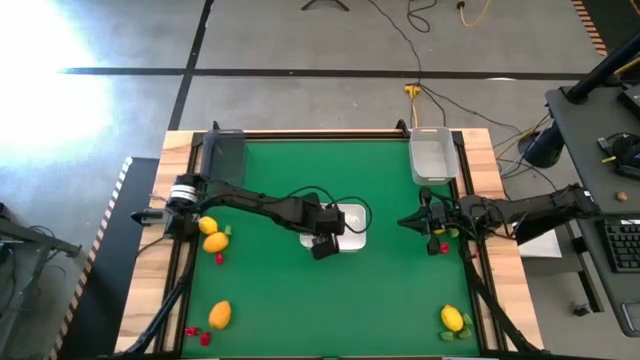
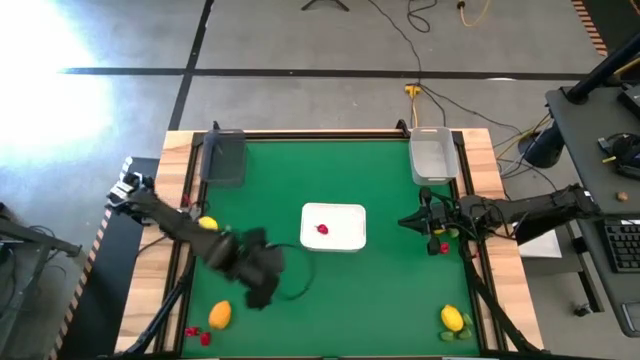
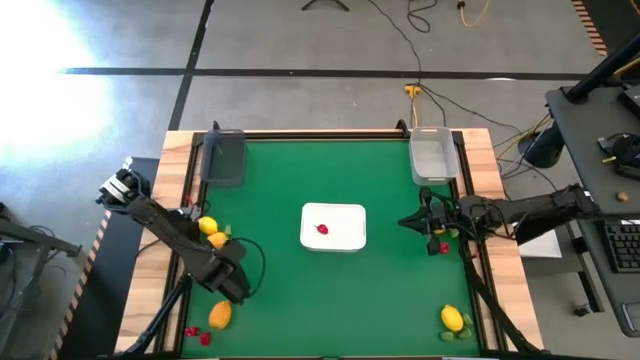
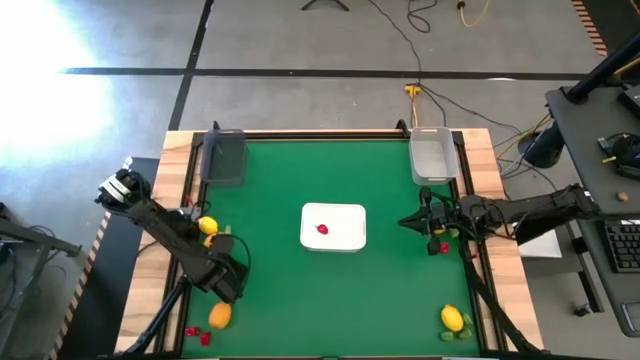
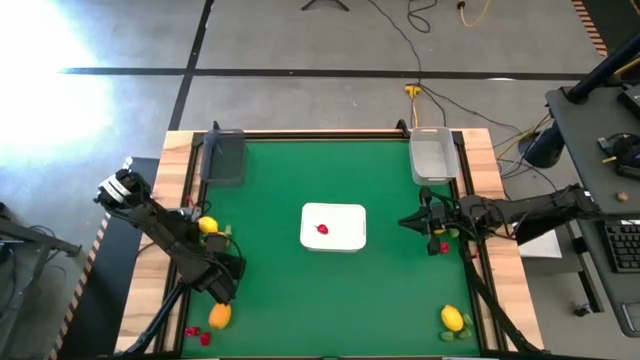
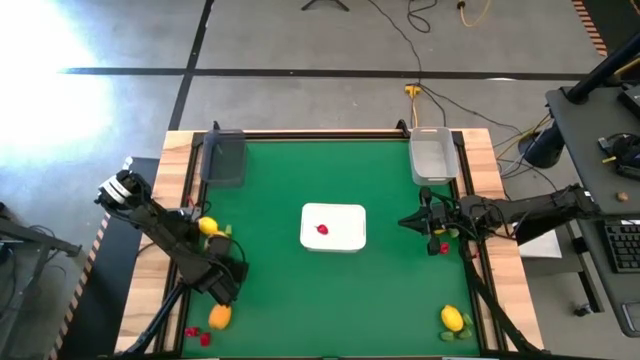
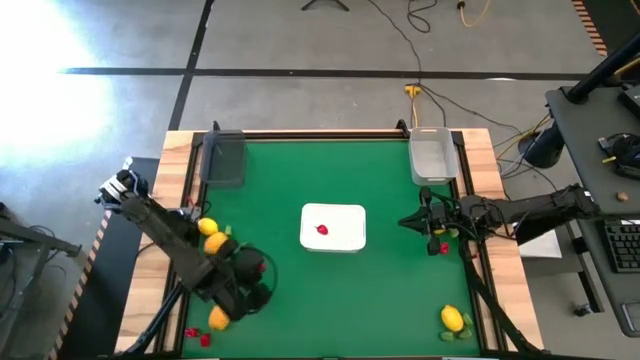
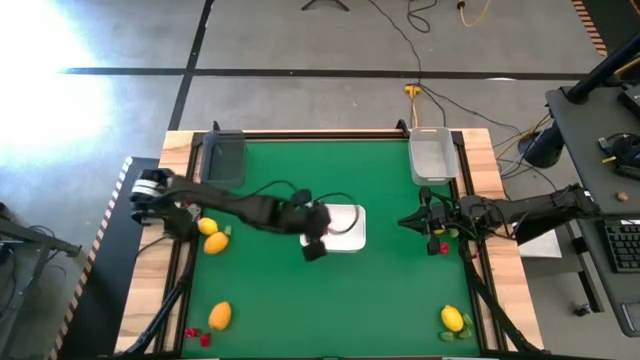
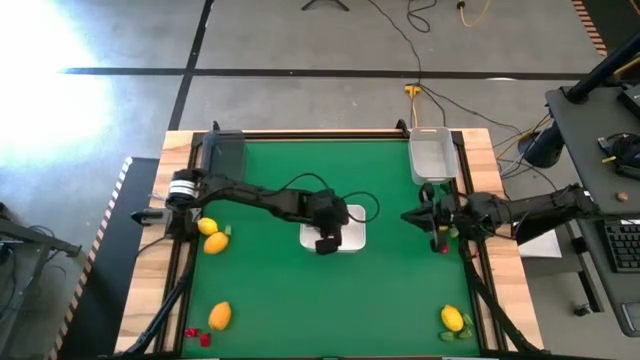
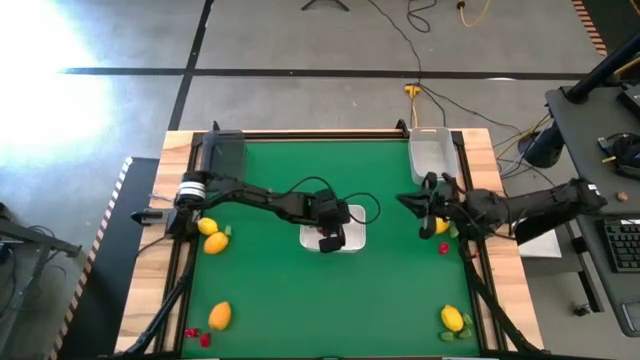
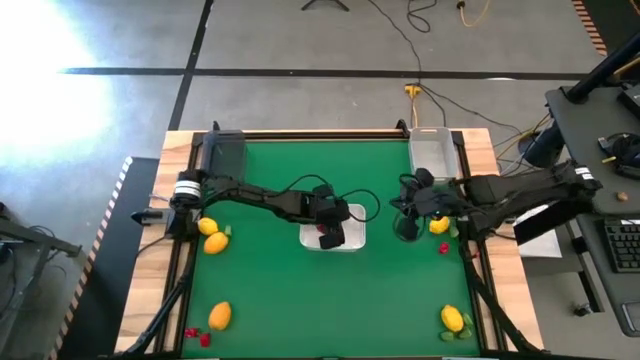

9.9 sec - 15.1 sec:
Task: Sort produce into baskets
Put the red chili pepper into the white bin

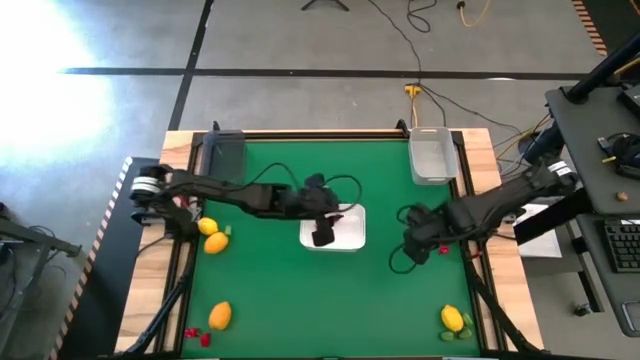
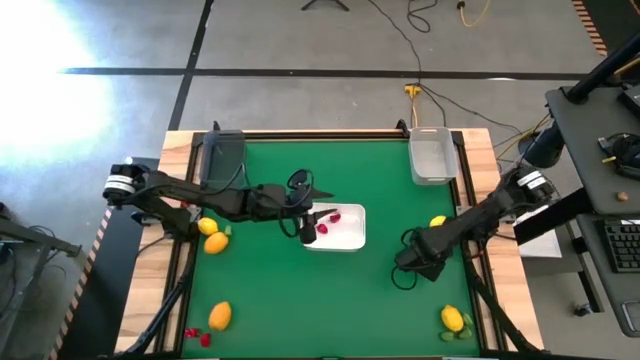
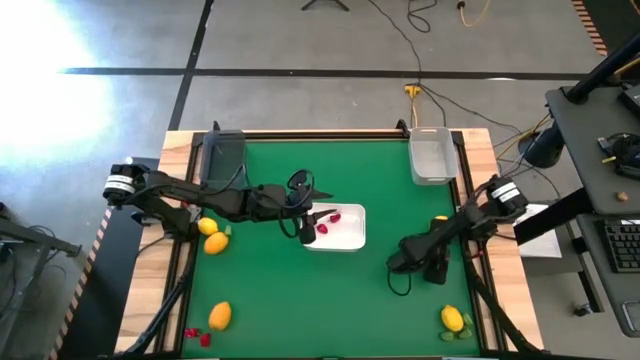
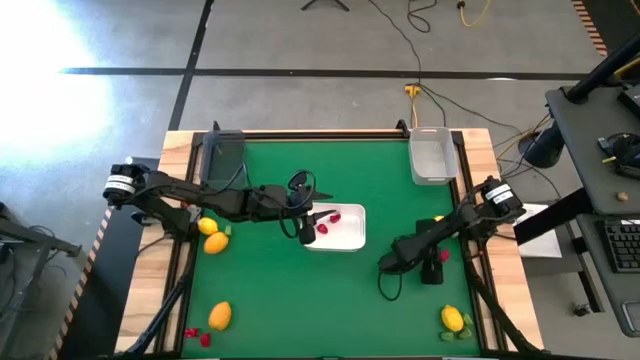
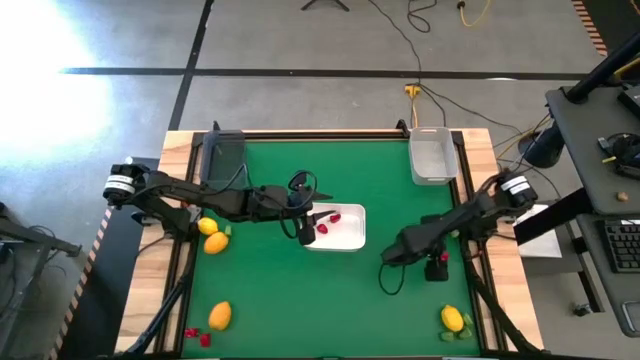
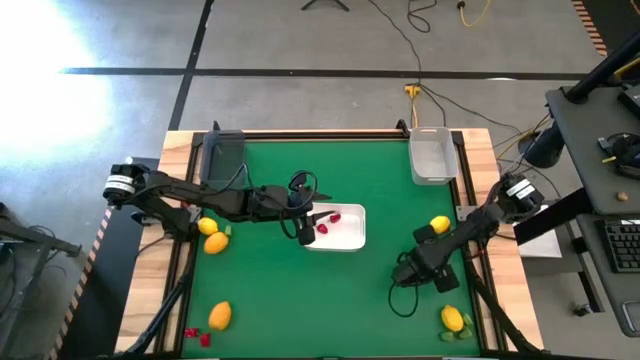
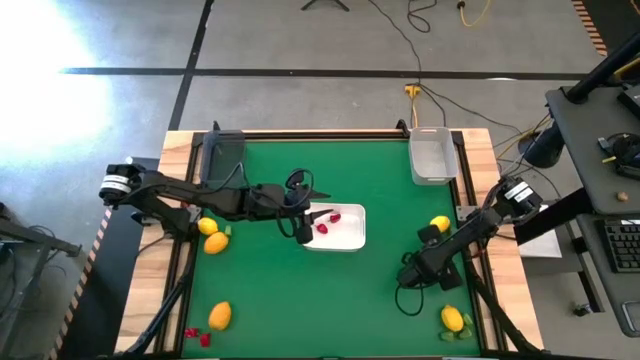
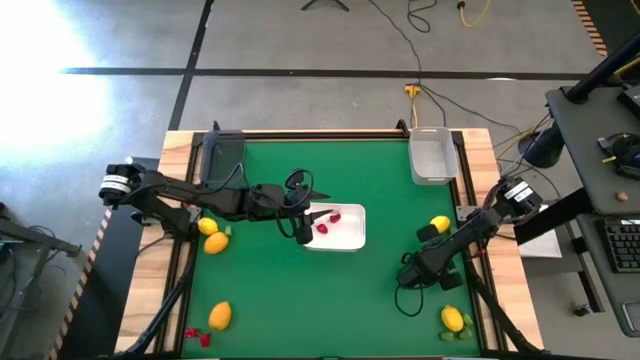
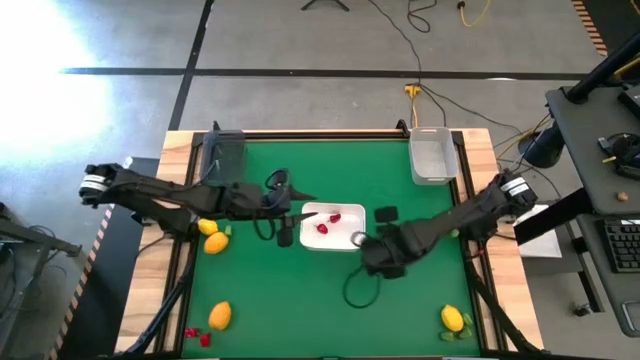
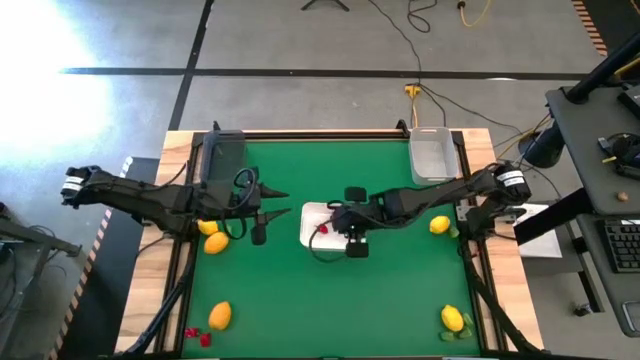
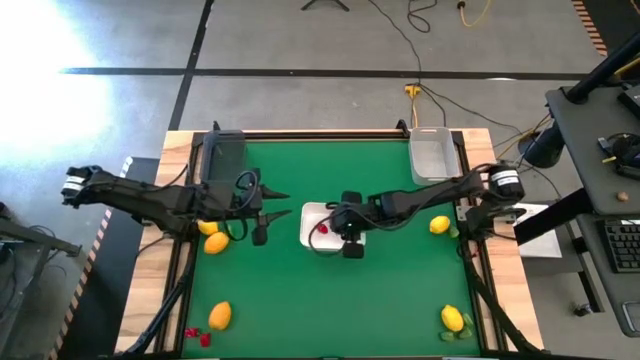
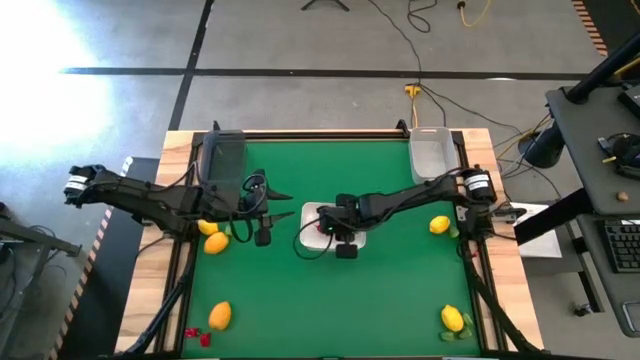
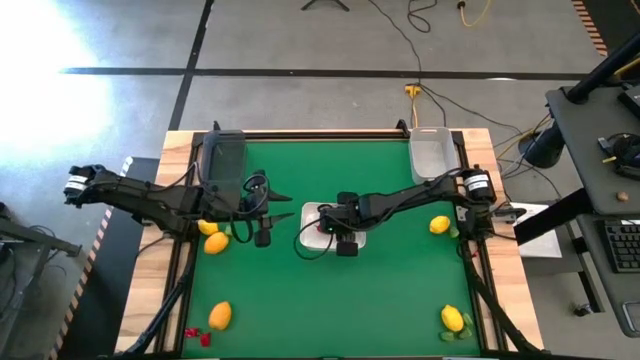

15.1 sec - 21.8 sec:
Put the red chili pepper into the white bin

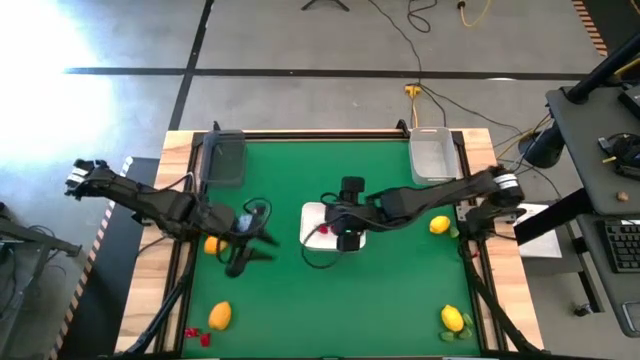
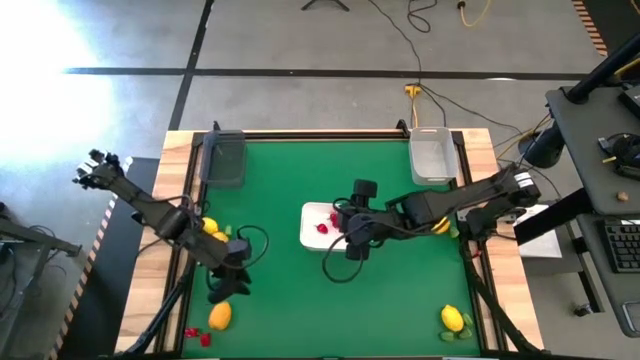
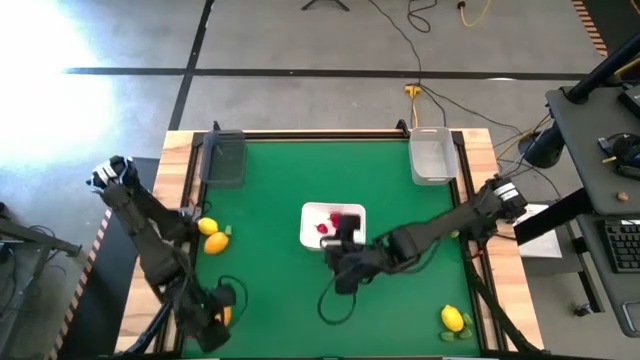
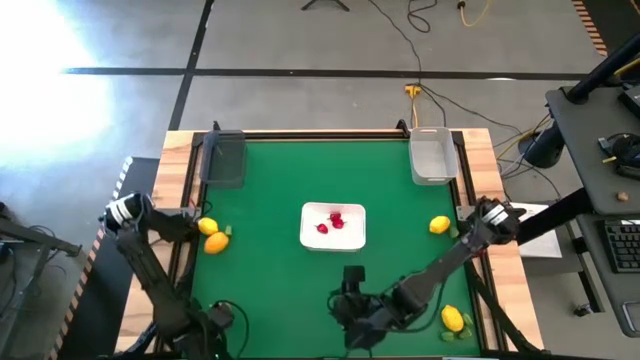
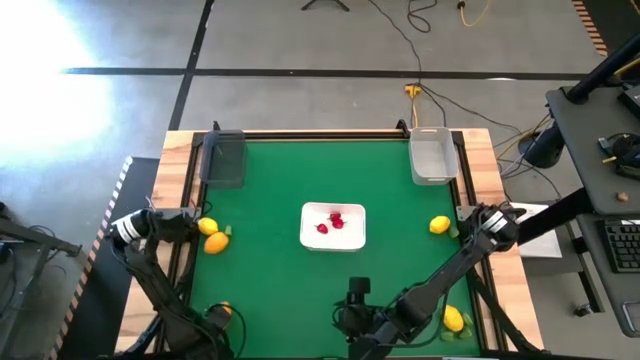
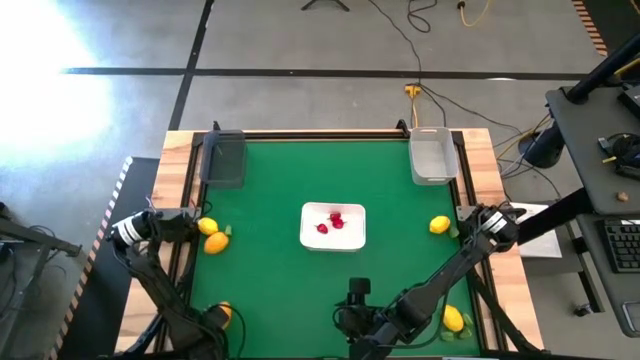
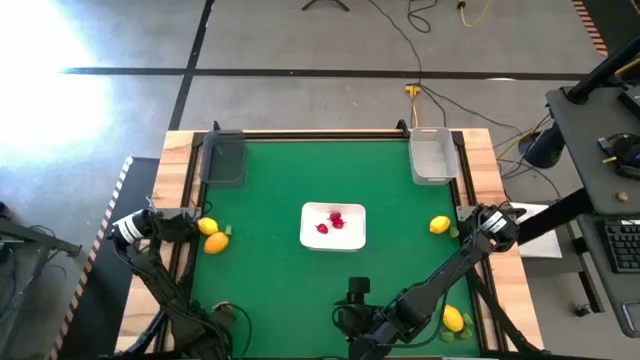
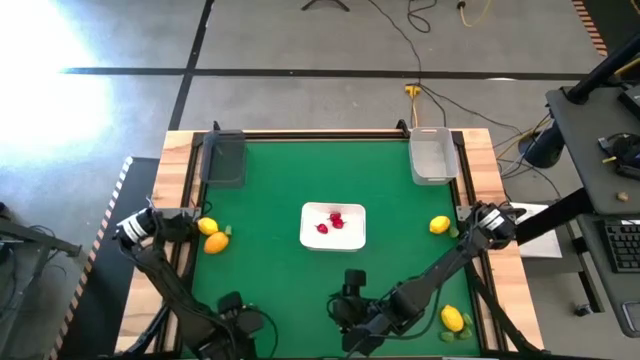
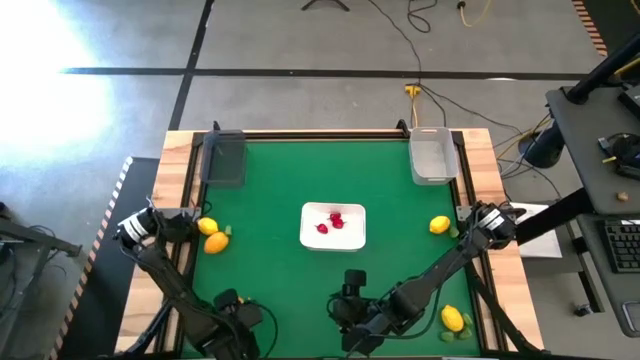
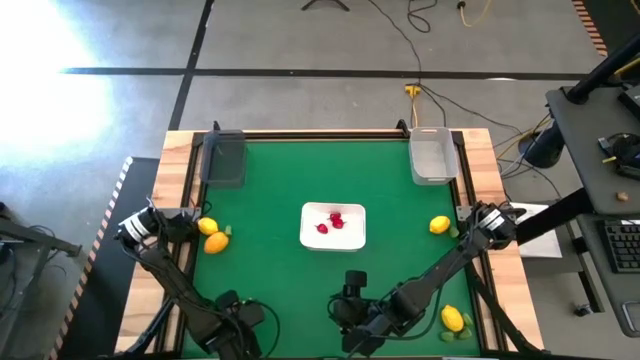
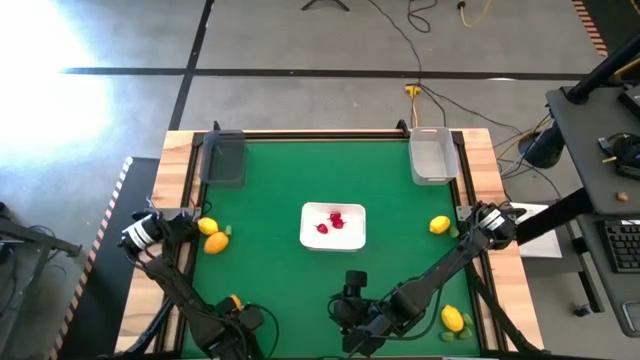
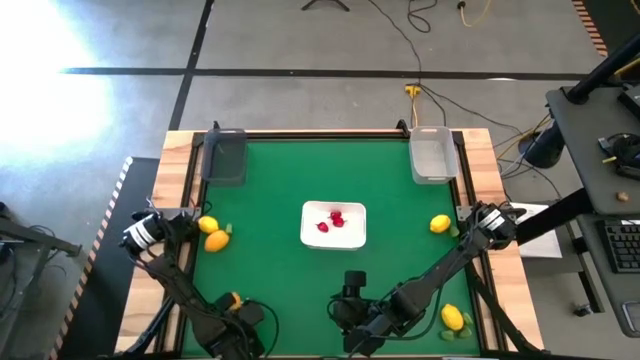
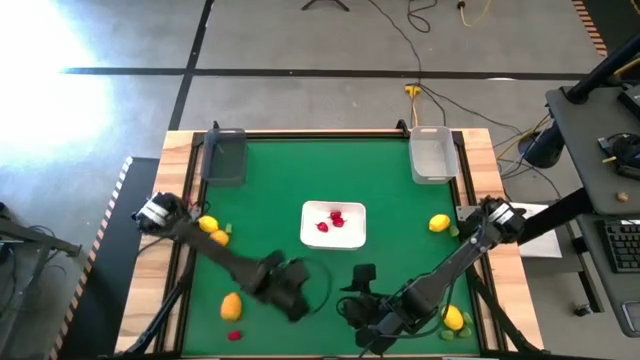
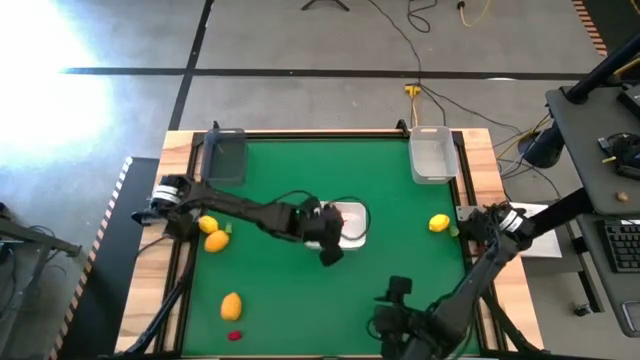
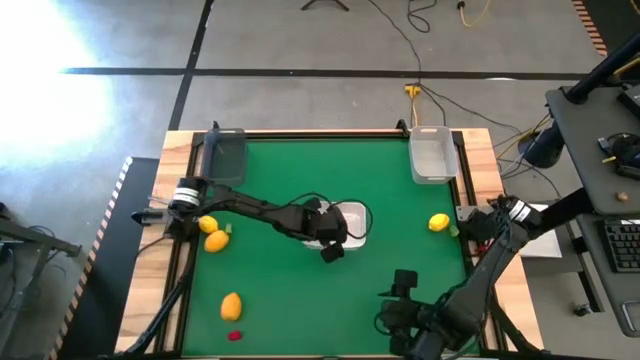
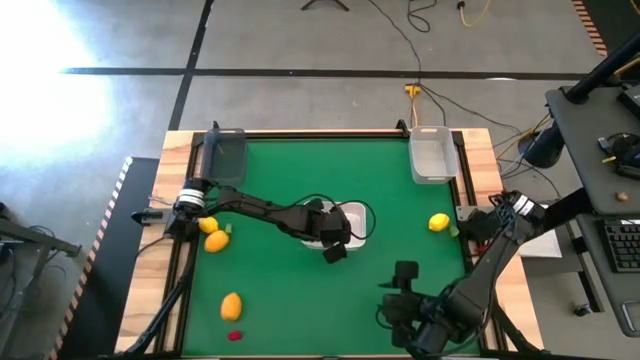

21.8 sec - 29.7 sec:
Put the red chili pepper into the white bin
